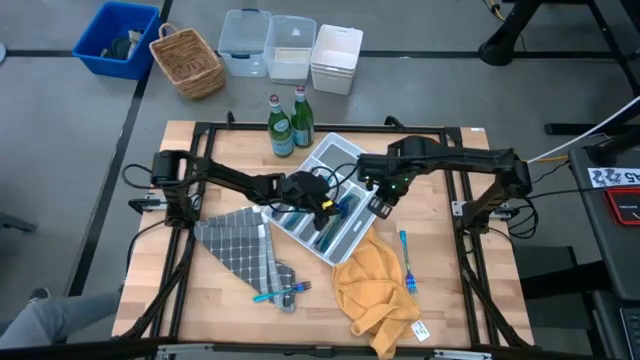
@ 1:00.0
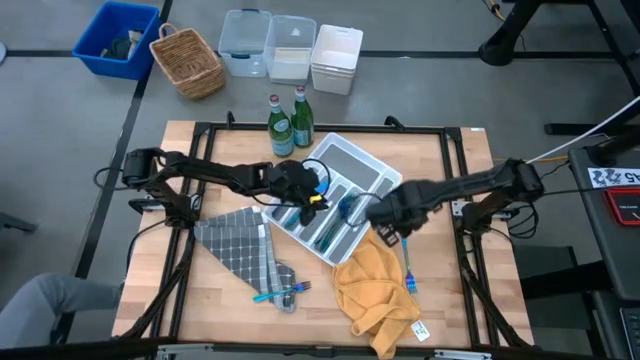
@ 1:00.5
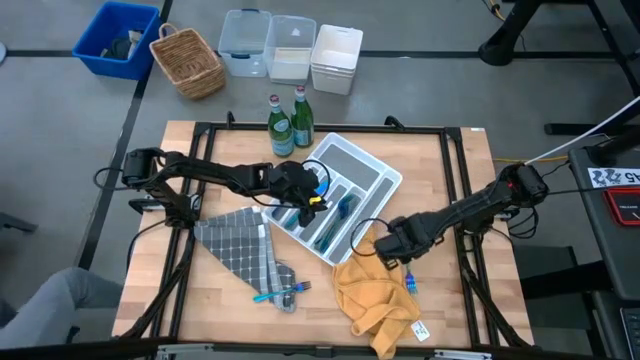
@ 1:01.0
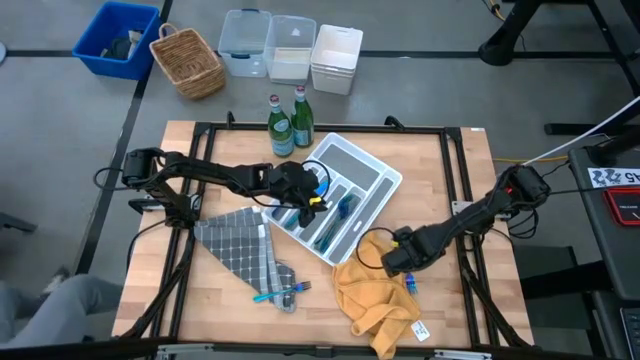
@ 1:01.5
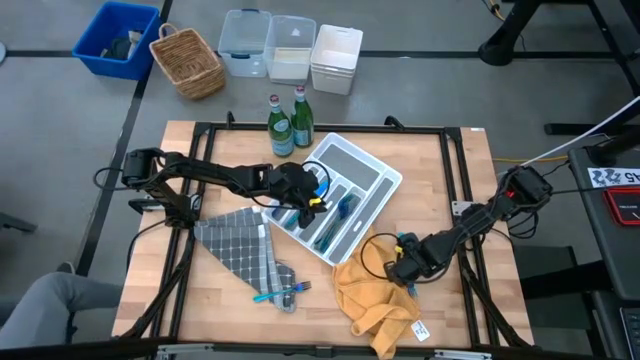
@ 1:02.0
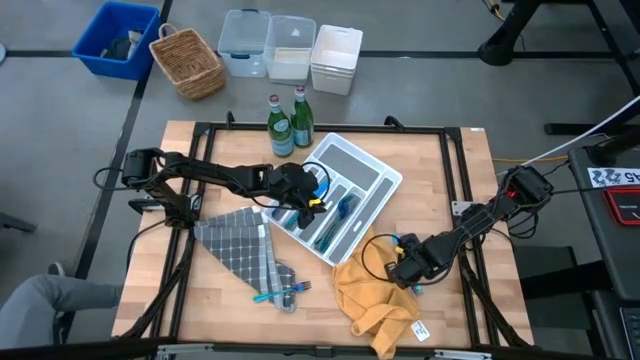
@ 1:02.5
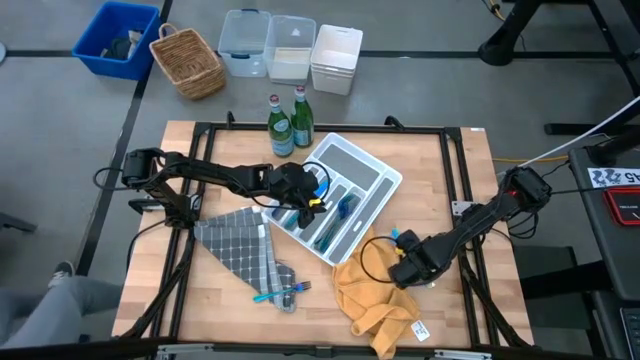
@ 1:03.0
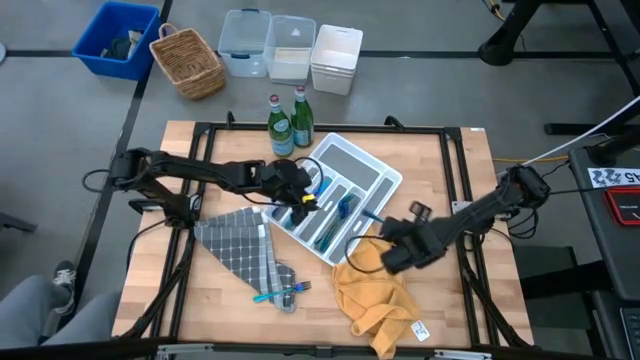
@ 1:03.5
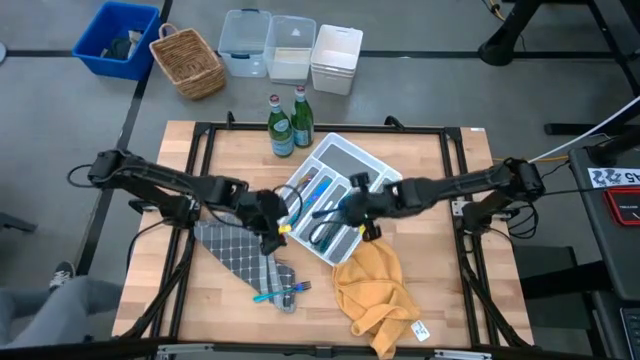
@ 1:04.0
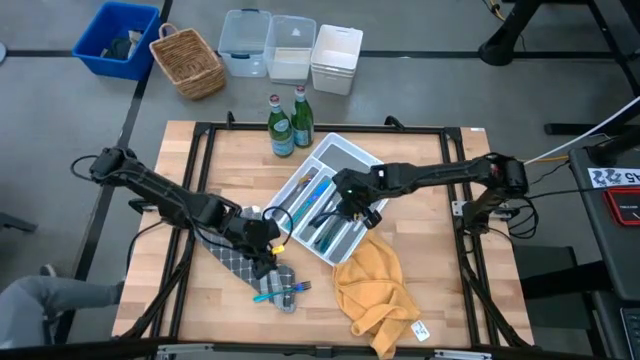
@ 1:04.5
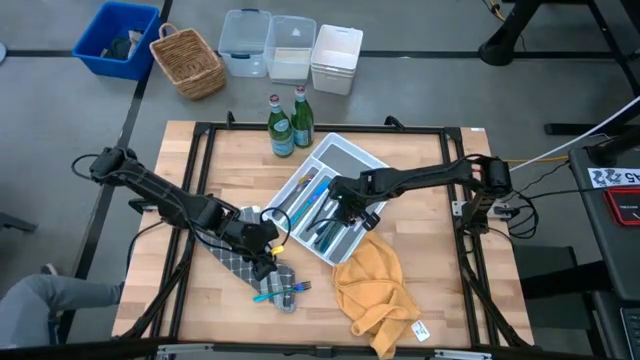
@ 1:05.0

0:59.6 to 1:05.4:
Put the blue fork into the cutlery tray

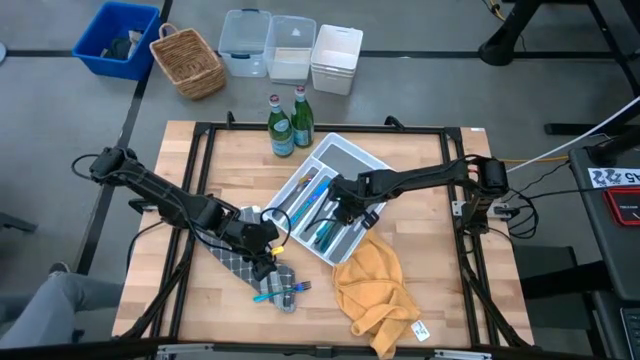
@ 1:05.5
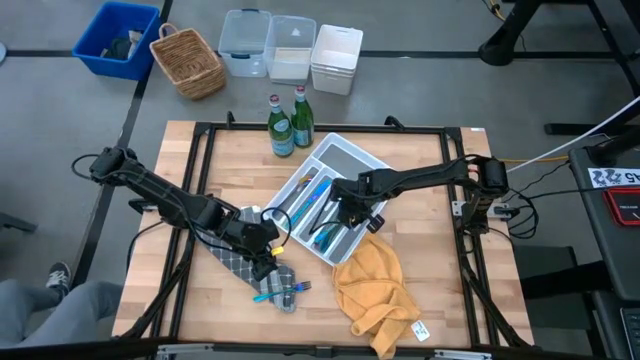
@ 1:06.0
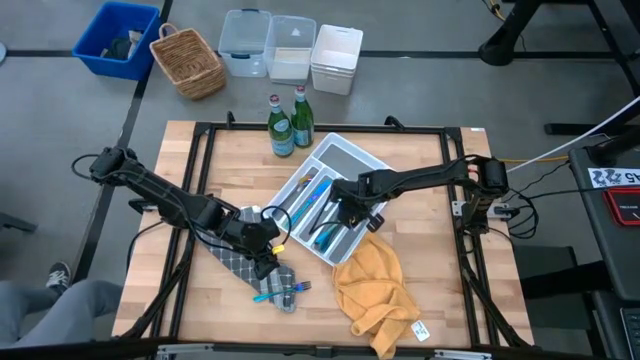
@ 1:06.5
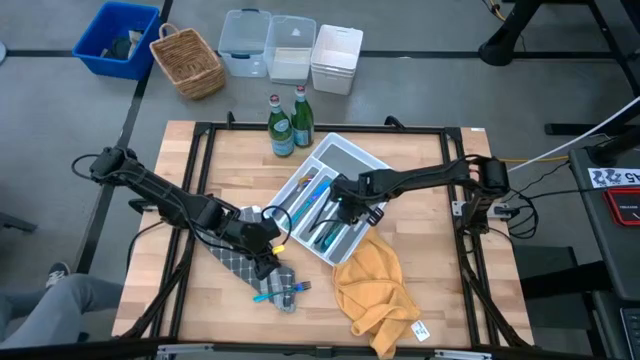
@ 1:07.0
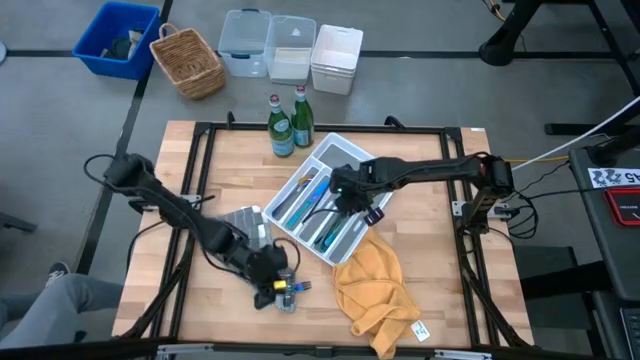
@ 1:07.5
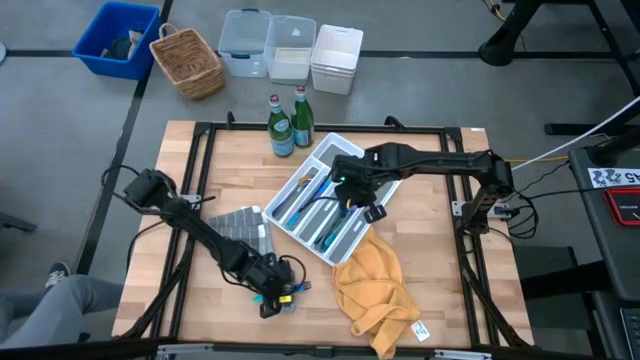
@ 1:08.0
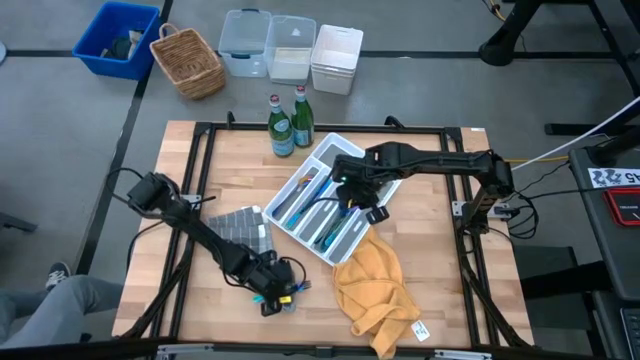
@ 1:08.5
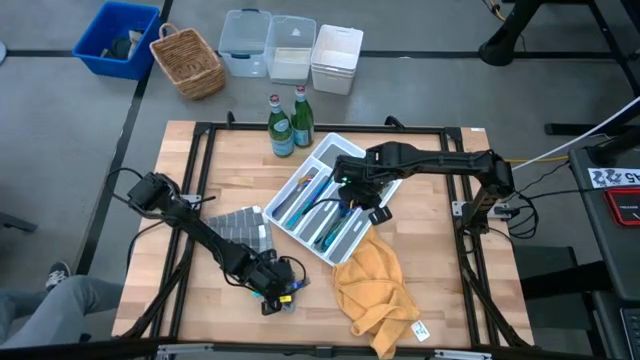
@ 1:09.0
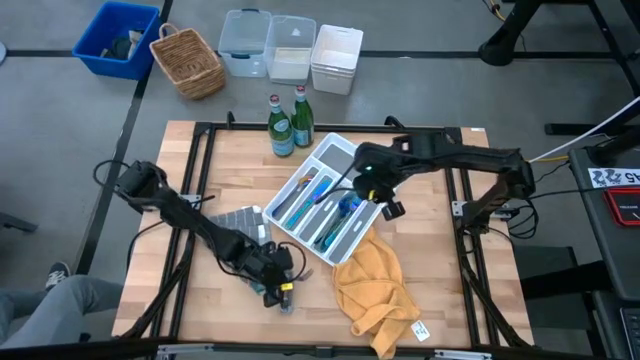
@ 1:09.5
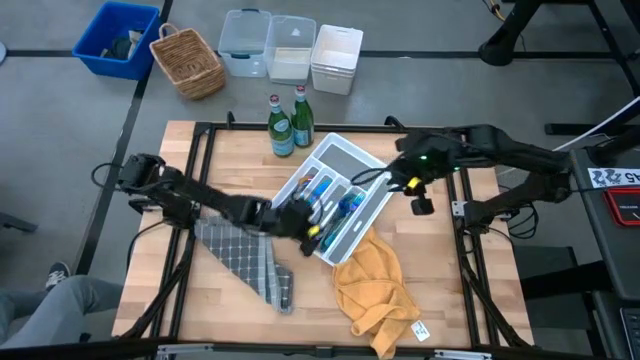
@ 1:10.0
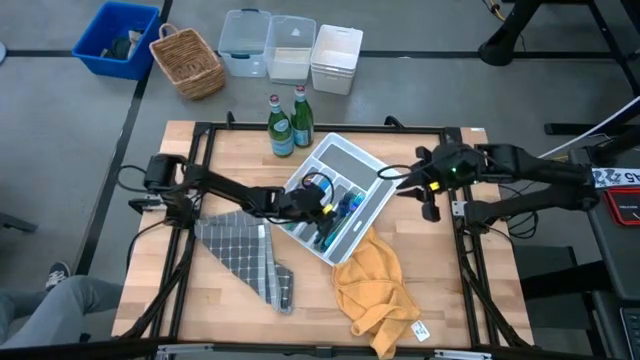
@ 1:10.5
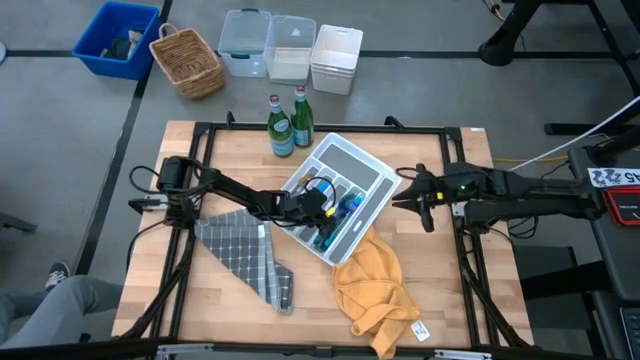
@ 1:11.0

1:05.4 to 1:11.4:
Put the blue fork into the cutlery tray

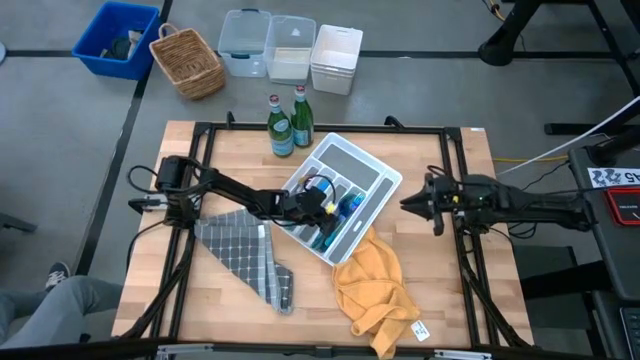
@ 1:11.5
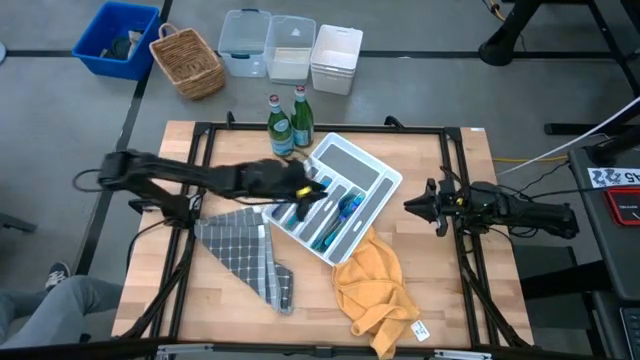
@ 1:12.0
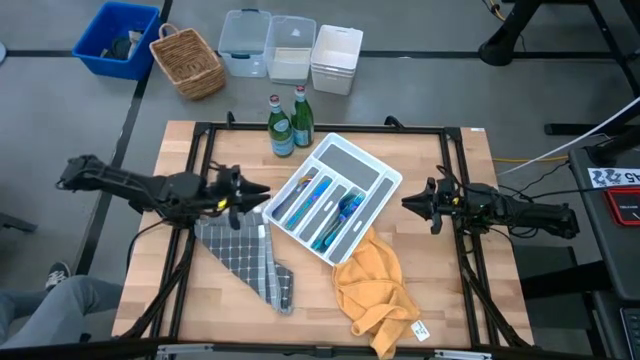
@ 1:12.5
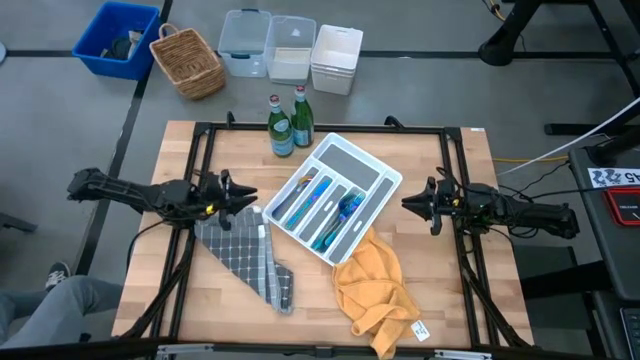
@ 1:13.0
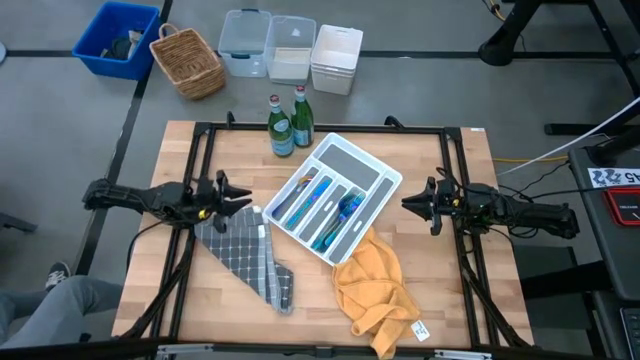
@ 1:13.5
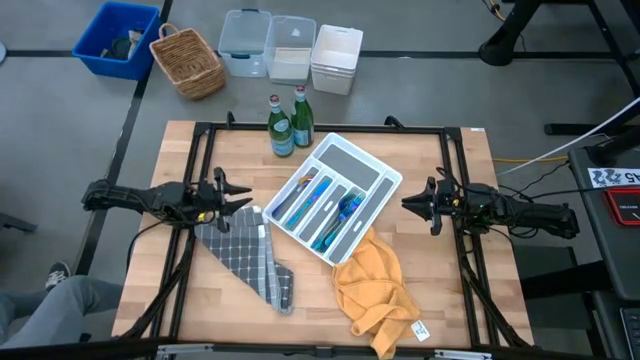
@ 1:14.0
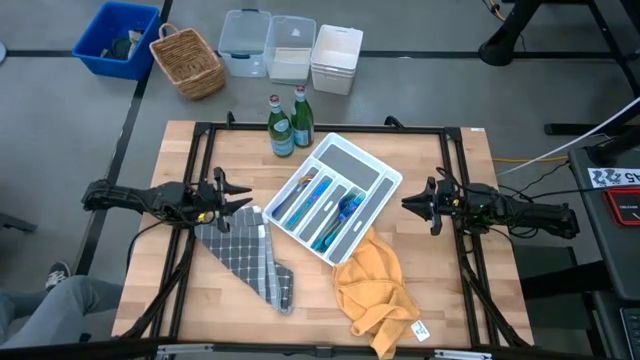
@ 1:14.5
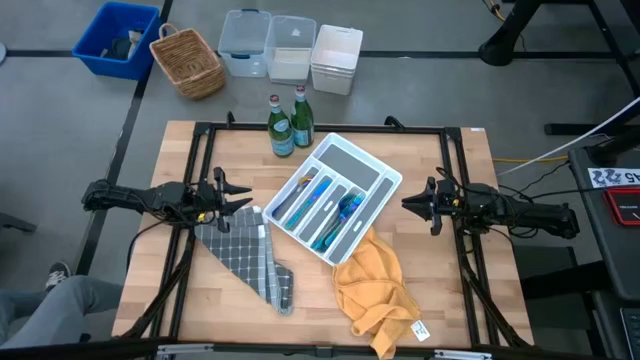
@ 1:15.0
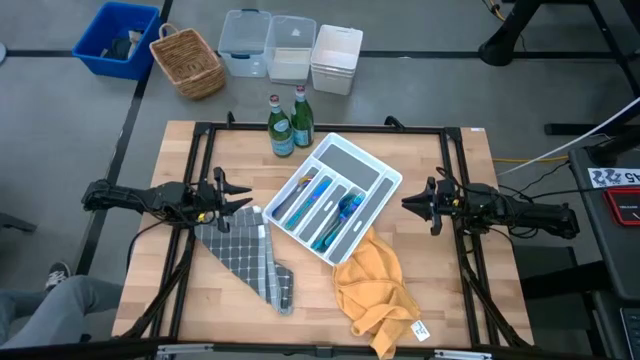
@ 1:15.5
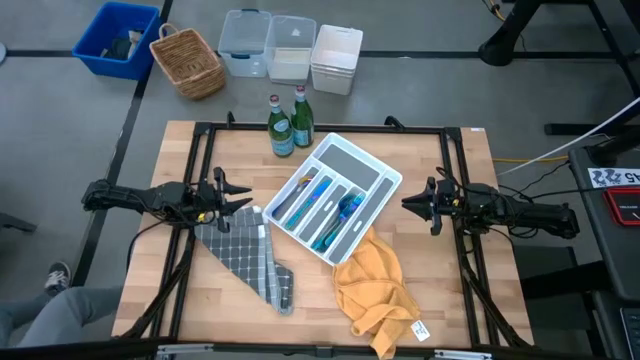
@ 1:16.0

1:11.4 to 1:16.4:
Return to Home Position

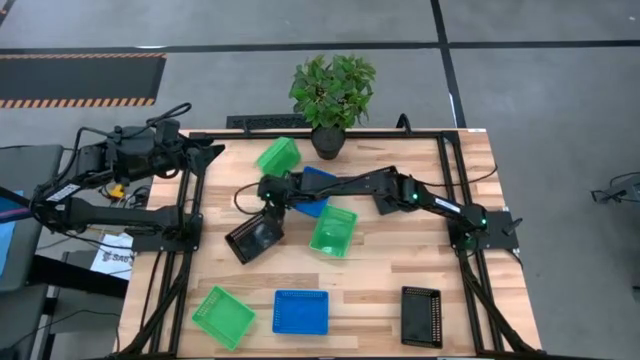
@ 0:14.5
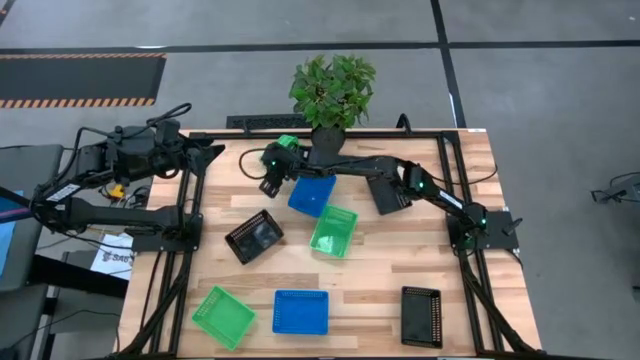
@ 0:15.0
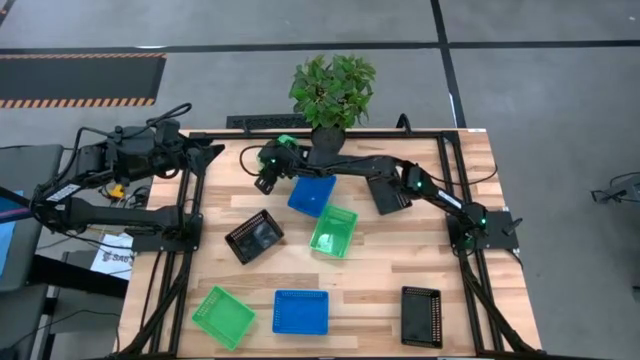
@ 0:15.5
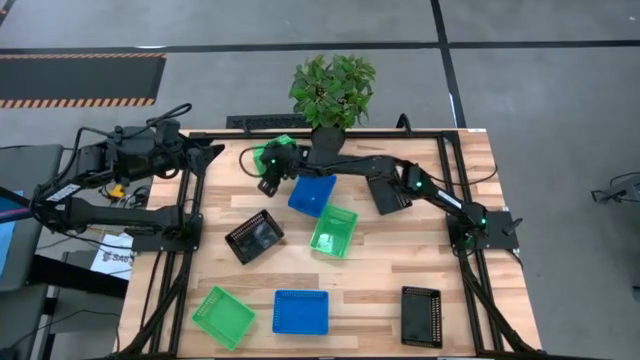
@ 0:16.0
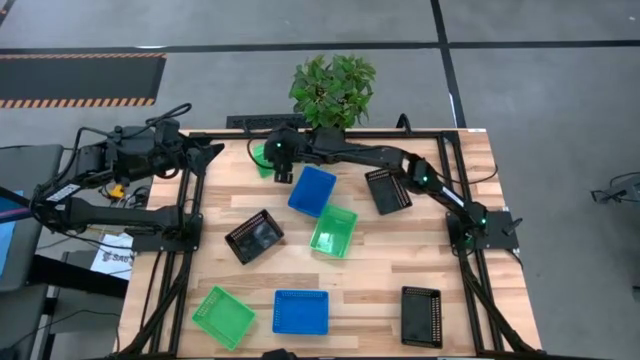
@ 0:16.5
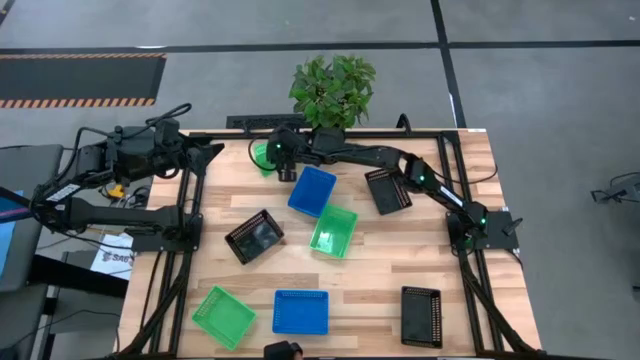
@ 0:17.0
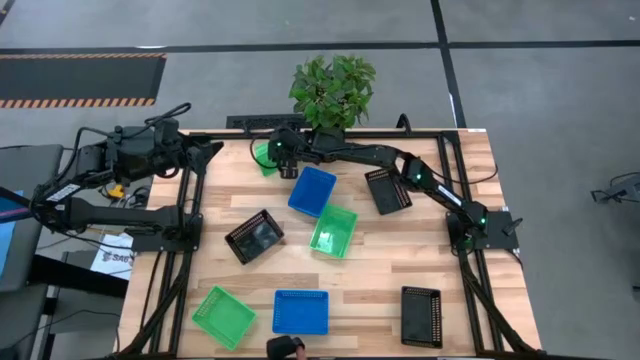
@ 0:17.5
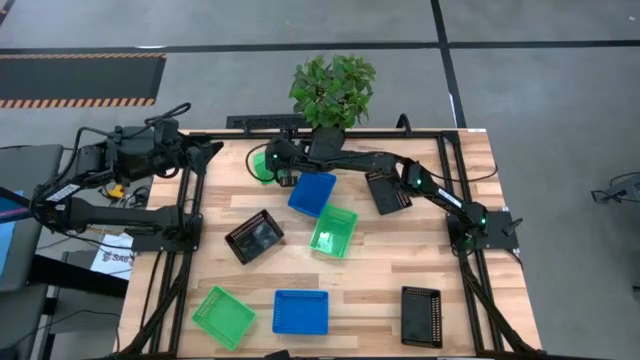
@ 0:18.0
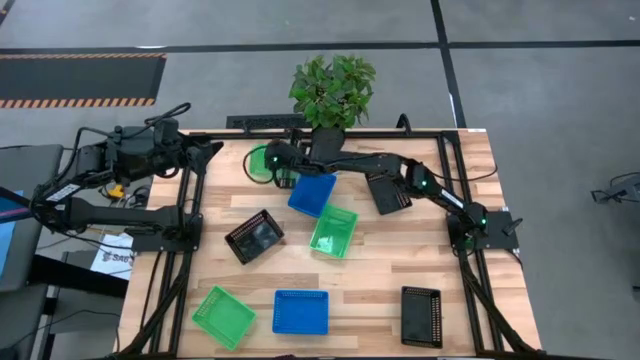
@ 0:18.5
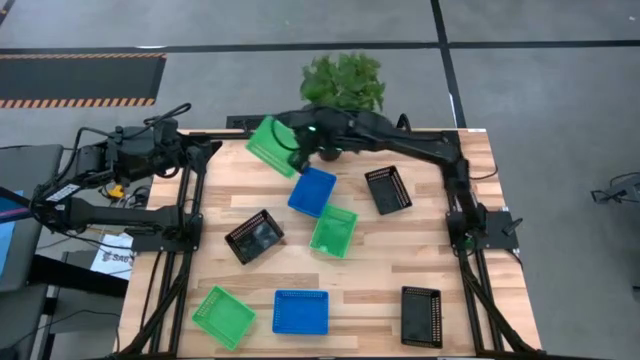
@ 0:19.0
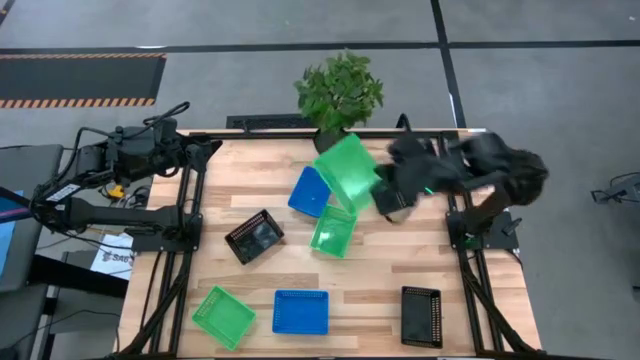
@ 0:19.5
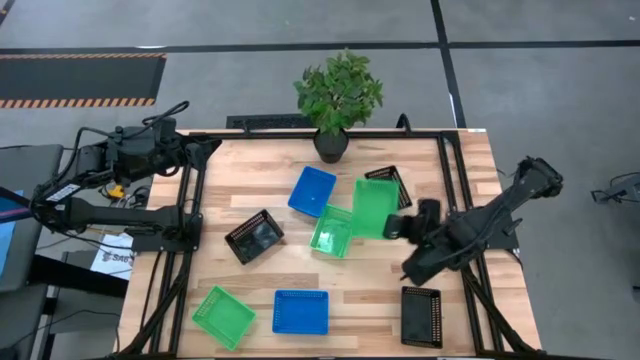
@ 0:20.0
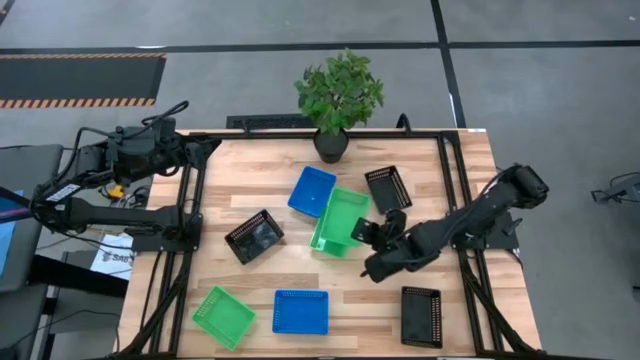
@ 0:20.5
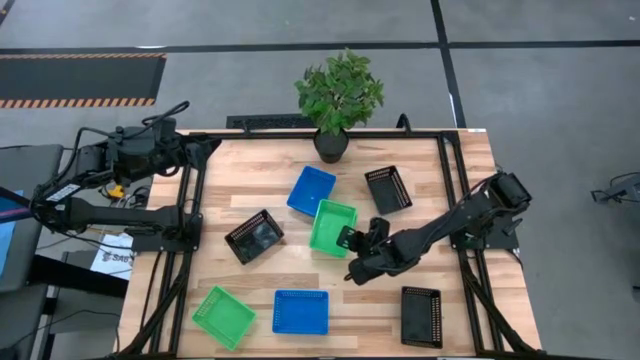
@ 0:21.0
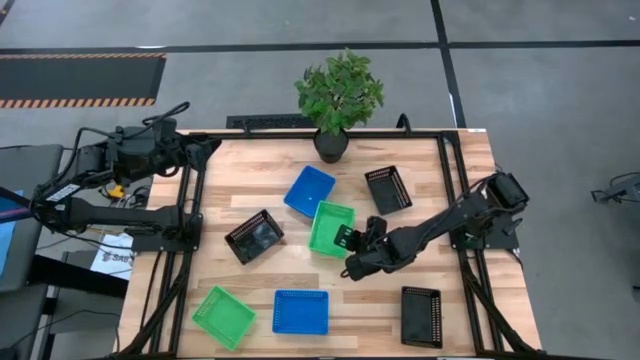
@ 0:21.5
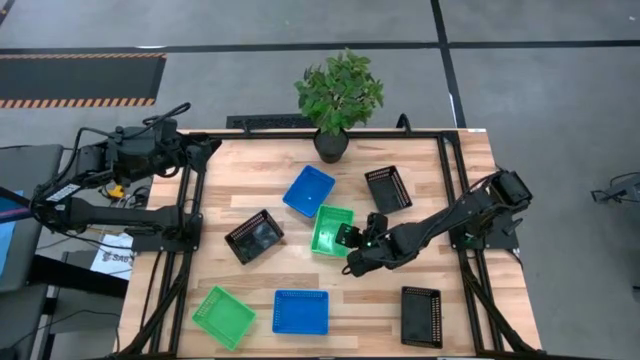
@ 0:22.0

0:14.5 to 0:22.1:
Stack the top green bin on the middle right green bin
